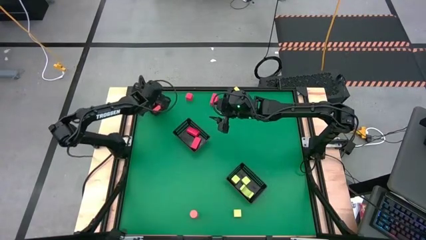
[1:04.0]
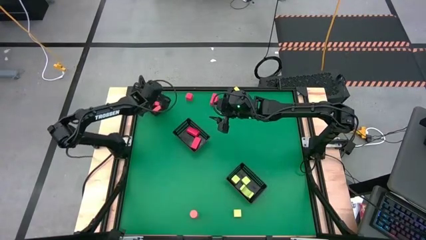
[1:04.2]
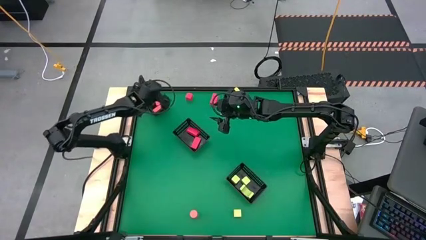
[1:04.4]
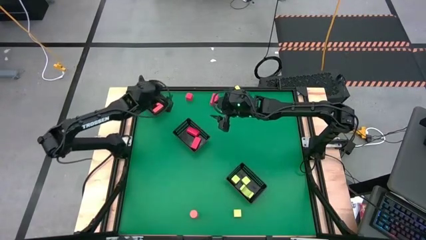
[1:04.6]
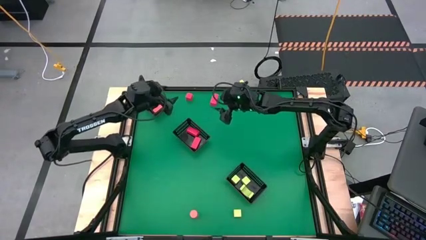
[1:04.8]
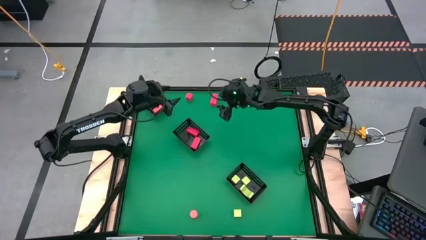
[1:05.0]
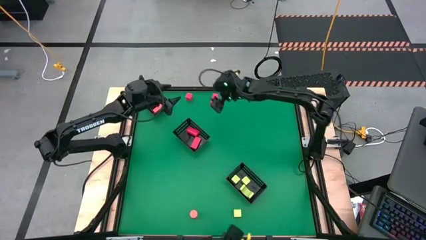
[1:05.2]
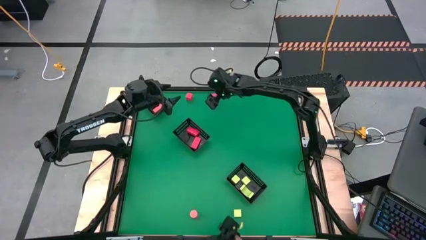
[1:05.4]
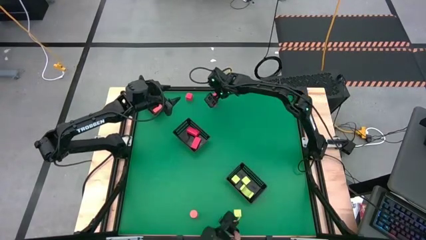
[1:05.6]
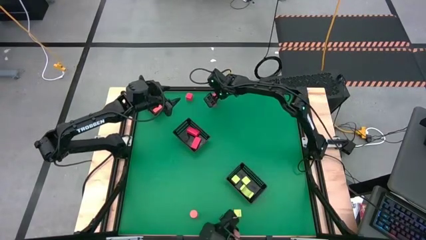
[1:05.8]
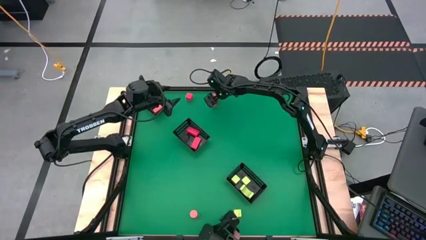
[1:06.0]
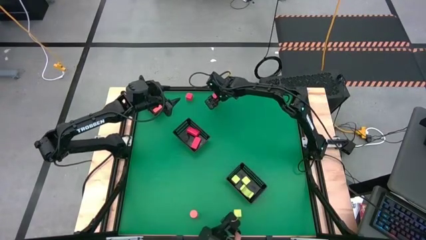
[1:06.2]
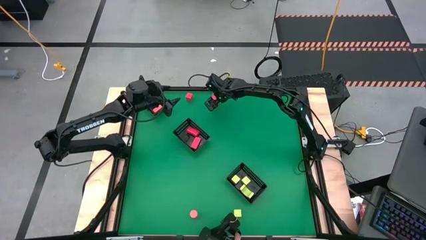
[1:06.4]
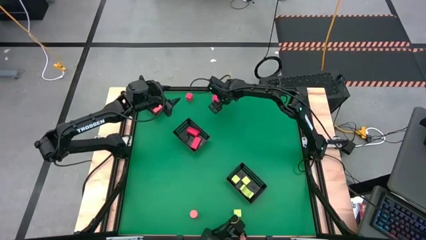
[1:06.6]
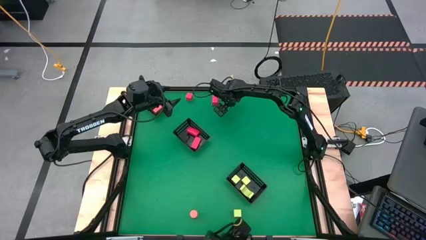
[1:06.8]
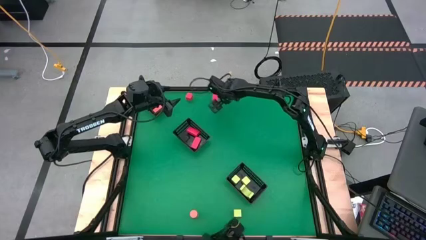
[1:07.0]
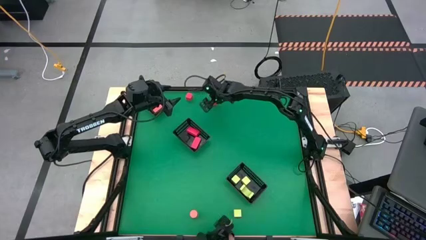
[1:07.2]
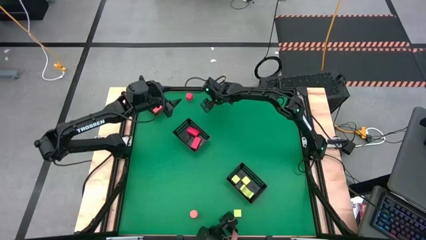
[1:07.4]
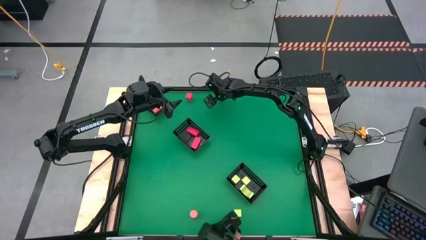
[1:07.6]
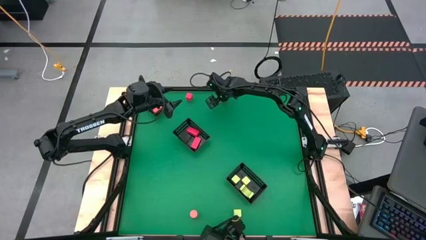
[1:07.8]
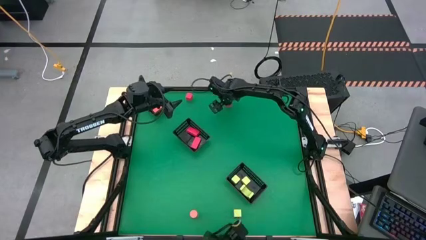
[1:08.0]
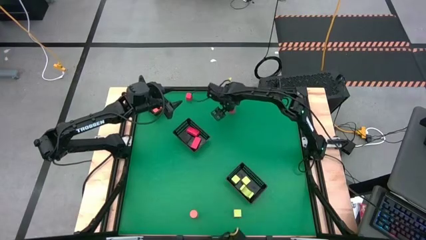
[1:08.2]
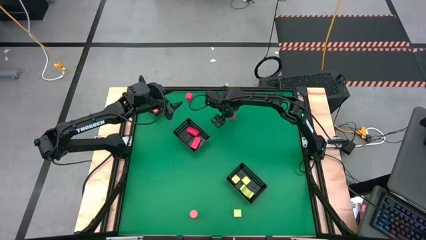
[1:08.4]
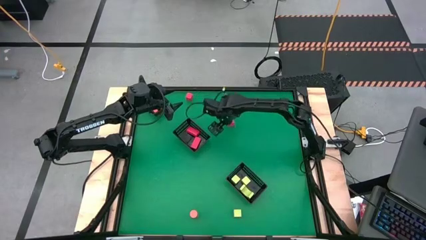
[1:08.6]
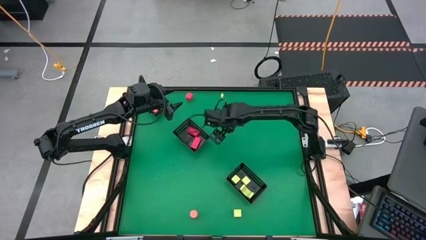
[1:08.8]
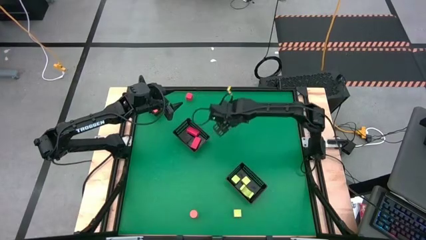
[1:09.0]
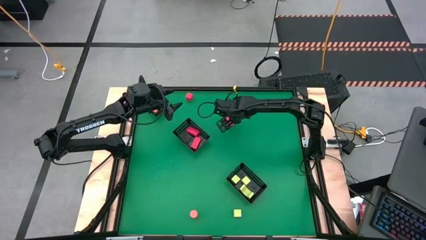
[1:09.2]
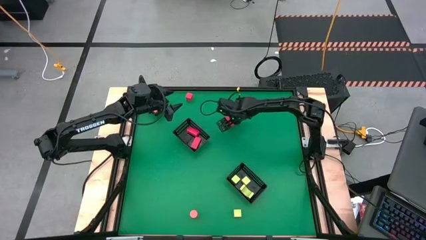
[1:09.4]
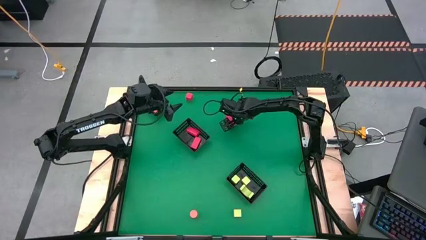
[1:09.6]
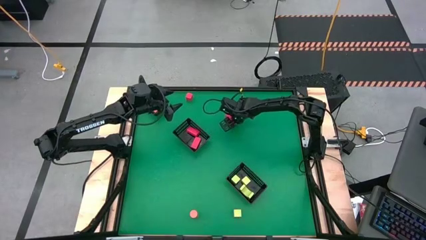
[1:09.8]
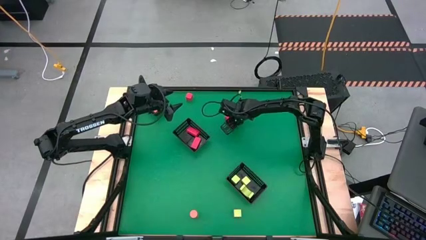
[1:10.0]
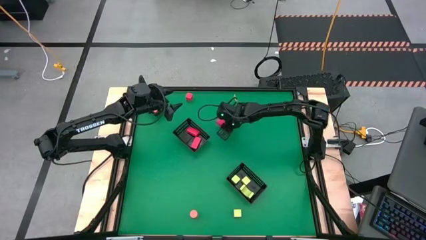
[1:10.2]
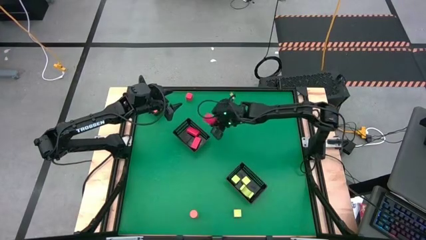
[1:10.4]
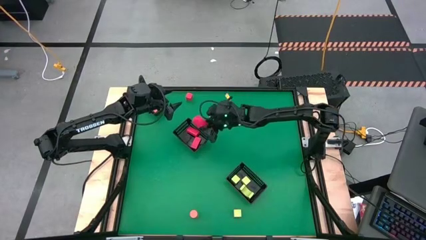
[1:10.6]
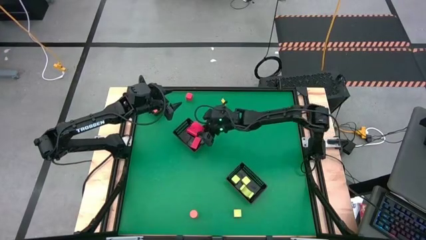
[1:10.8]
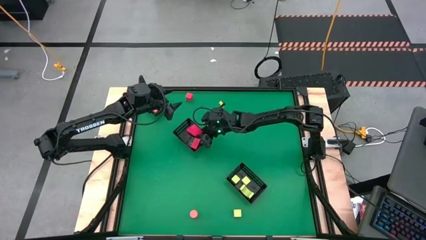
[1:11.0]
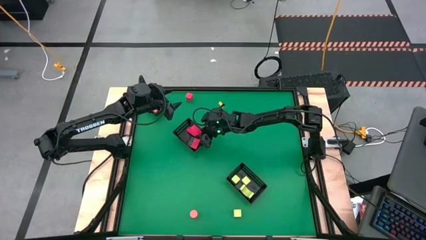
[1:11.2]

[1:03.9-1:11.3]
Task: Sort & place blocks by color
Put the red block into the middle black bin

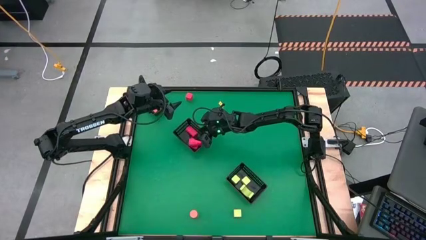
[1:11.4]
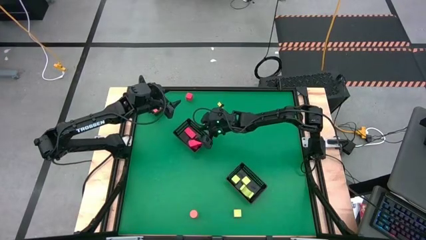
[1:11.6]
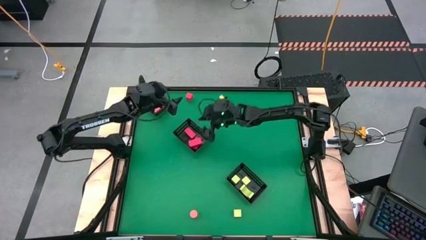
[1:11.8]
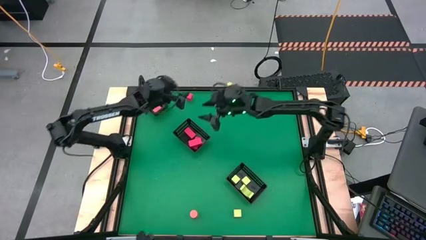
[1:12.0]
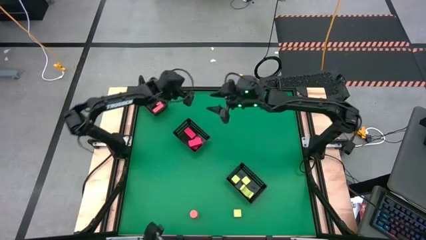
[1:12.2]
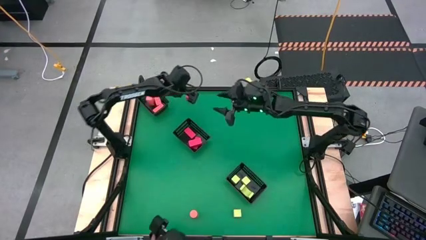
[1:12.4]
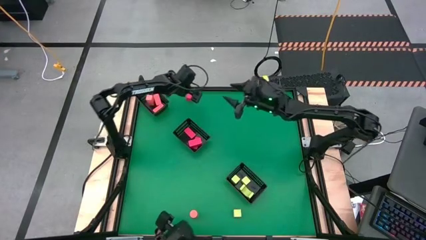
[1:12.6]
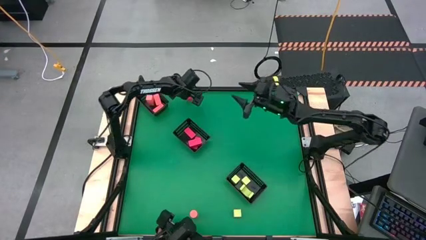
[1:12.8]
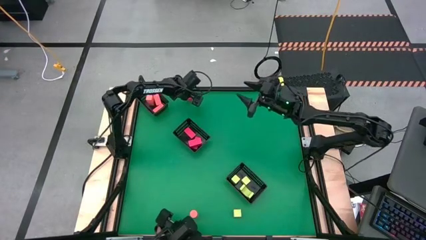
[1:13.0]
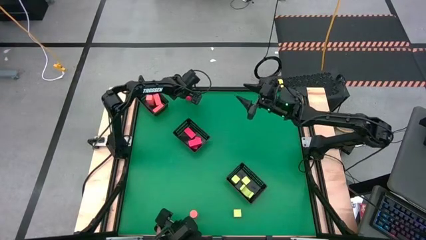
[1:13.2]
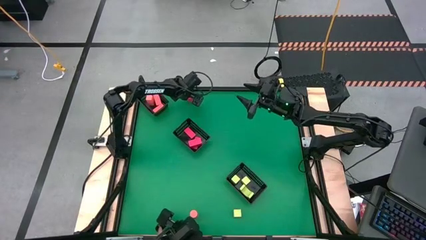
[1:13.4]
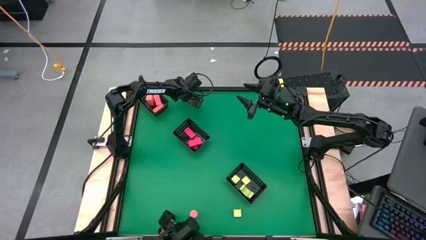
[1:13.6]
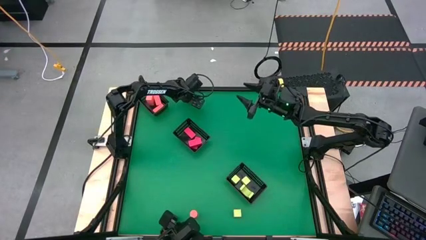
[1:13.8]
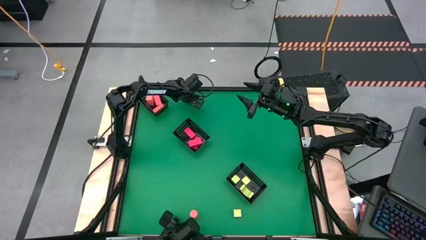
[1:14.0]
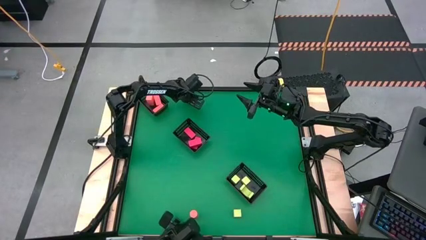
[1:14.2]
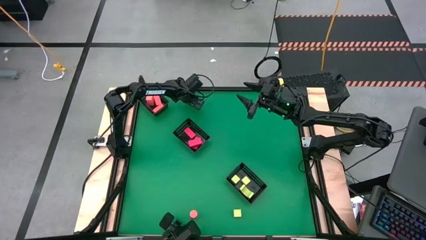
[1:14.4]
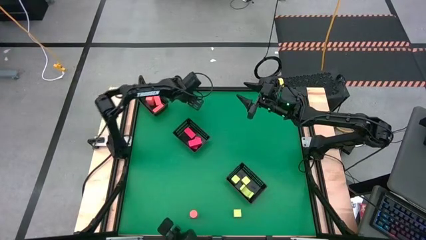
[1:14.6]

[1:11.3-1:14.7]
Put the red block into the middle black bin

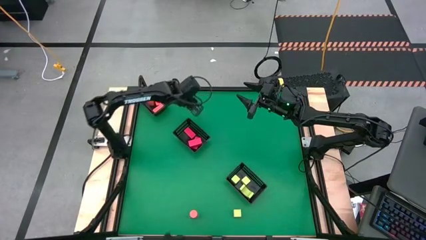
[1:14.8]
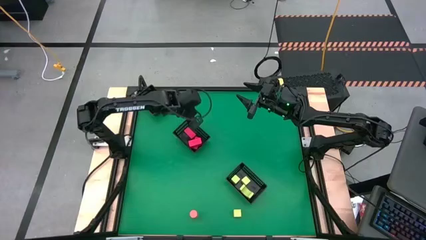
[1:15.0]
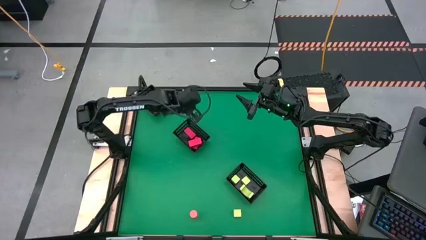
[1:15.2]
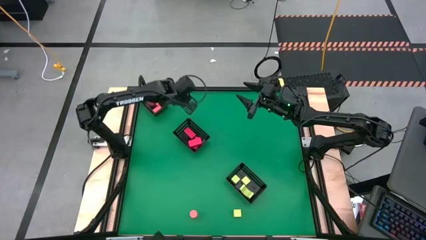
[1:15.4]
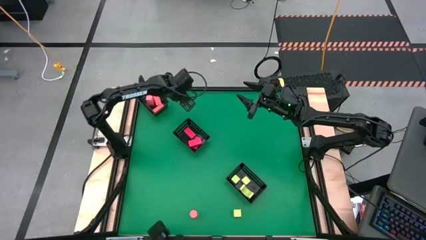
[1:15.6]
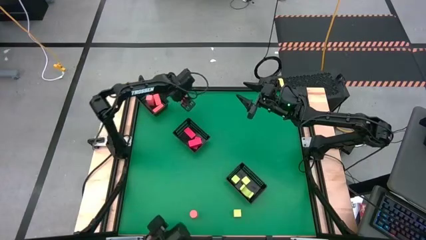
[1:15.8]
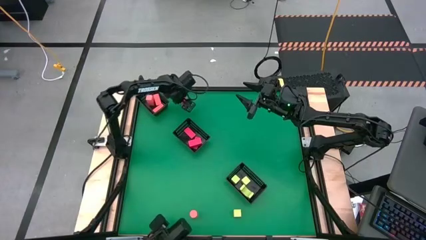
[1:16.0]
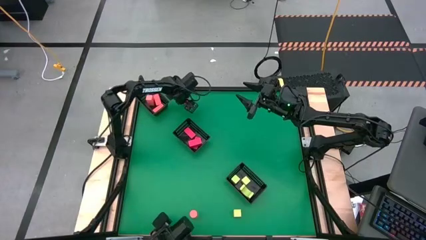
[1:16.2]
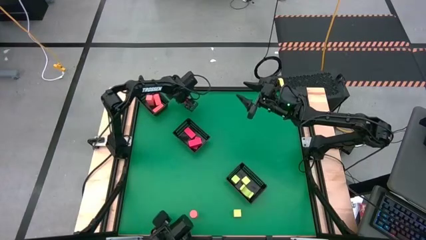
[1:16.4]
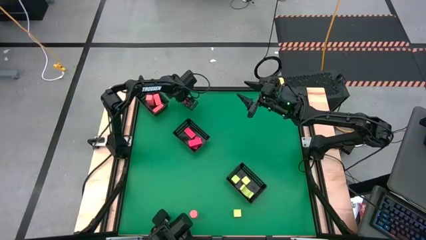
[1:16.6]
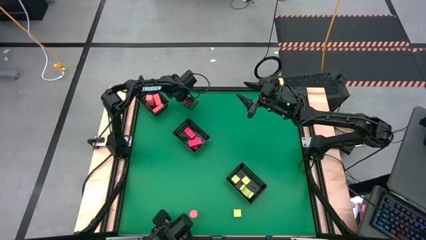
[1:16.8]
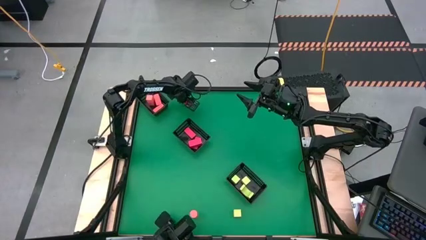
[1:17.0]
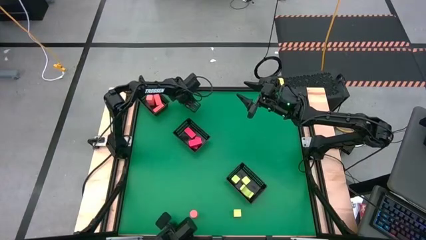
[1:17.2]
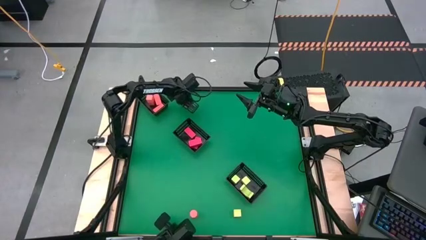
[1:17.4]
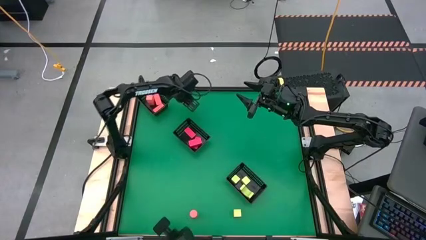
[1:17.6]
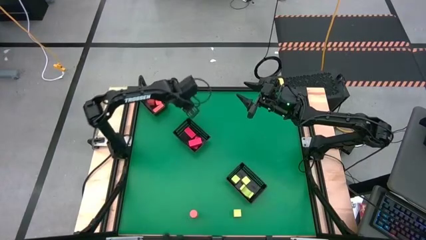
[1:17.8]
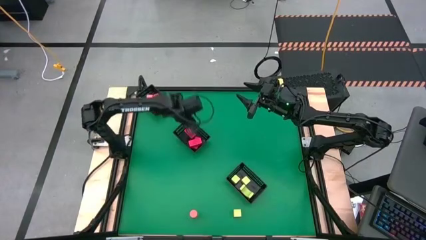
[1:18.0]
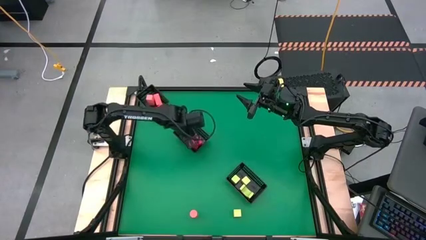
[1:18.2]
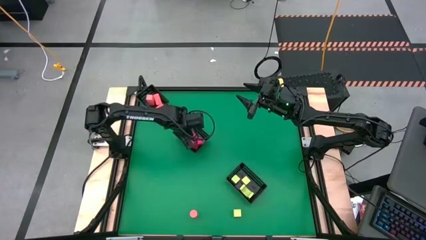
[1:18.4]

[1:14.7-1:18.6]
Put the red block into the middle black bin

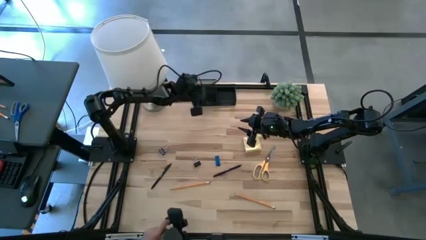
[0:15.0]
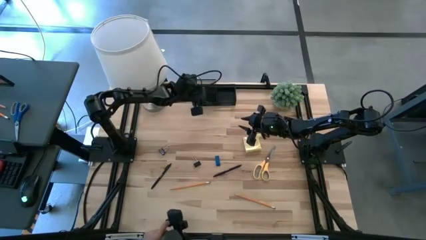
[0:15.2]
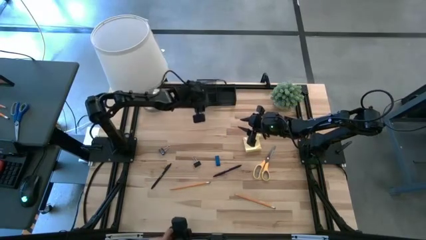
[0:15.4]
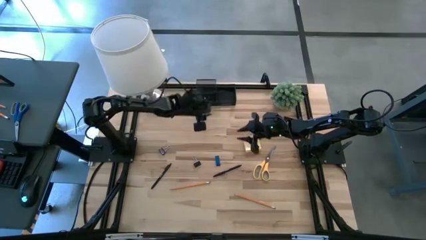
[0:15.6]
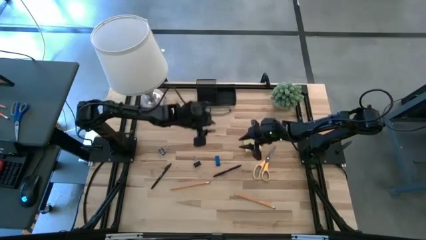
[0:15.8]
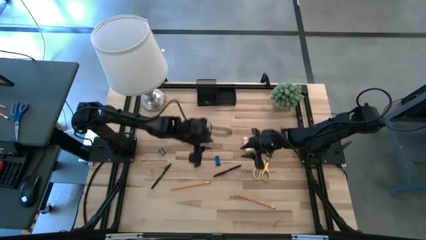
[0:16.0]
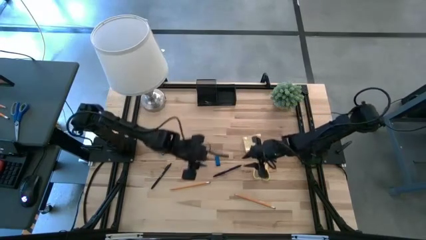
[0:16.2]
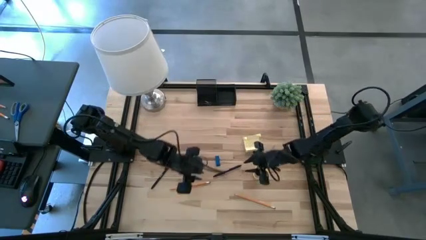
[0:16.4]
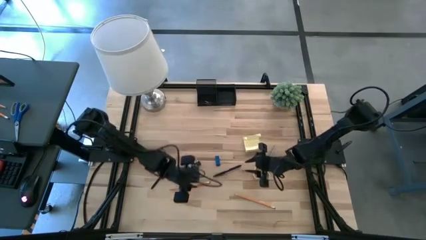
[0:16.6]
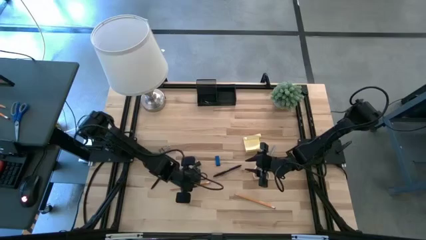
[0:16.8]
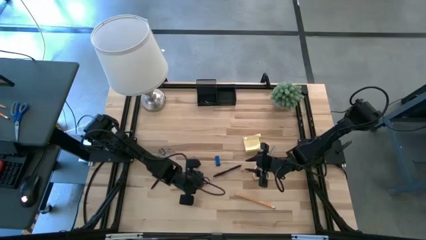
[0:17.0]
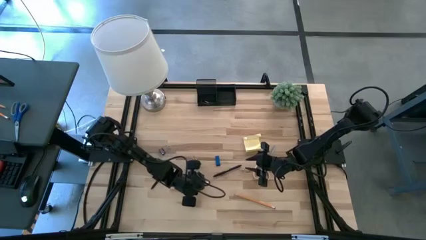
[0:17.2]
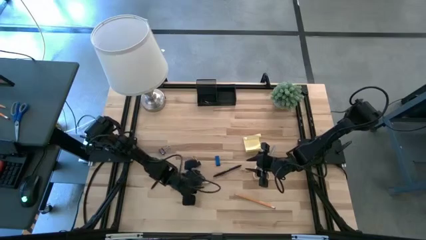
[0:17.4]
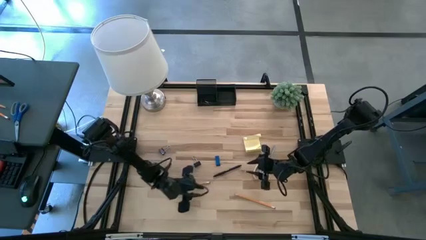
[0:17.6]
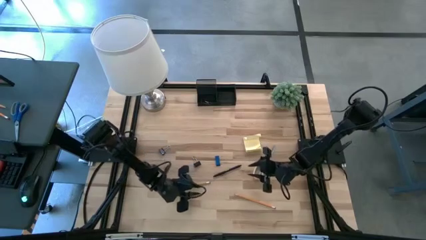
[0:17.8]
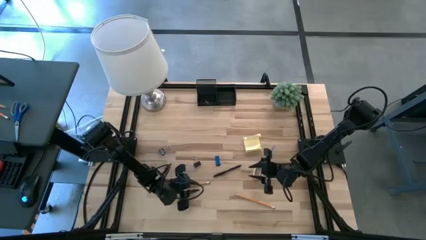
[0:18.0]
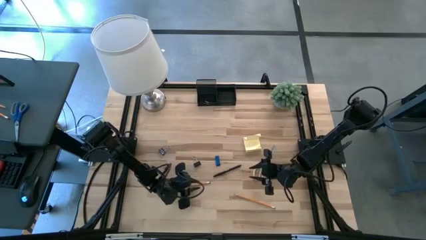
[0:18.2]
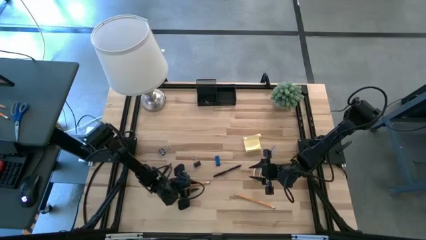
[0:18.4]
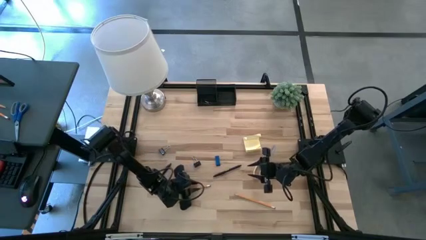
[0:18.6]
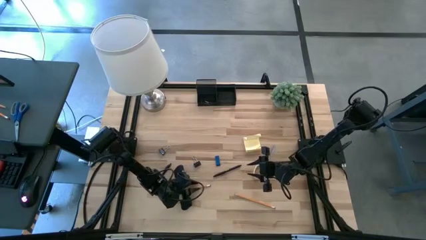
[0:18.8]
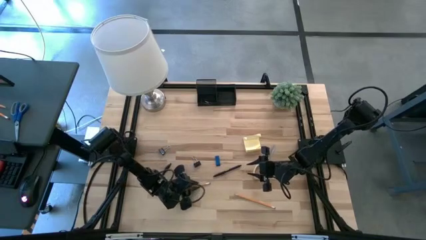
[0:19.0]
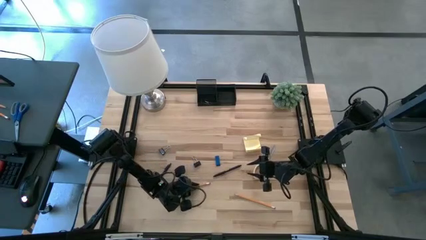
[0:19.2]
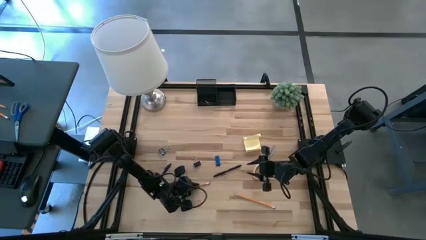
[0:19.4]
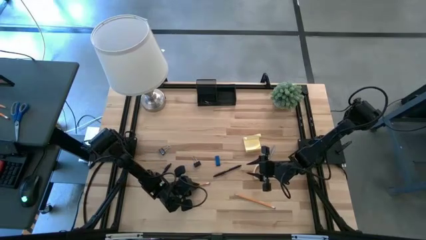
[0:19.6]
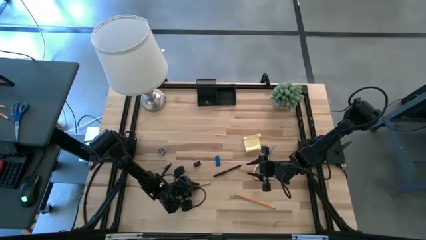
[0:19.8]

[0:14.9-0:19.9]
Task: Pick and place office supplies into organizer
Put the left orange pencil into the black desk organizer
